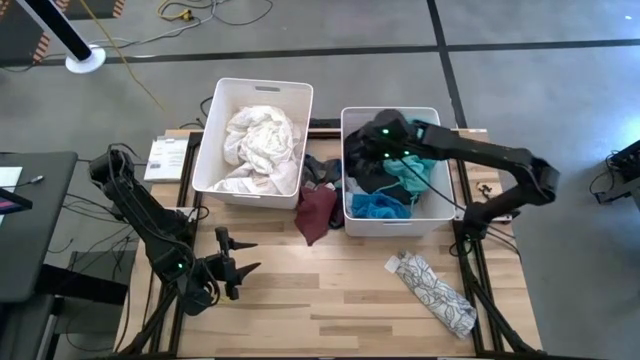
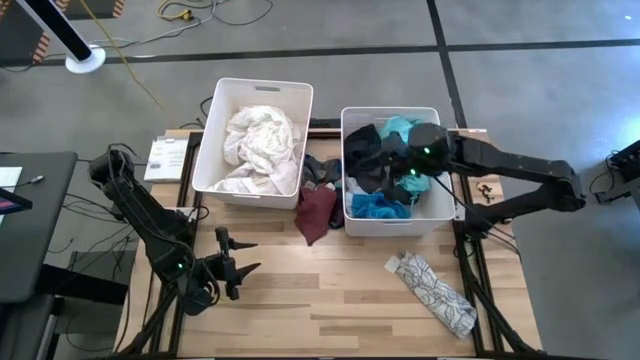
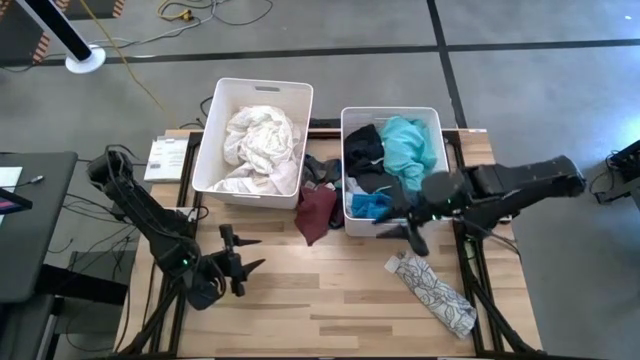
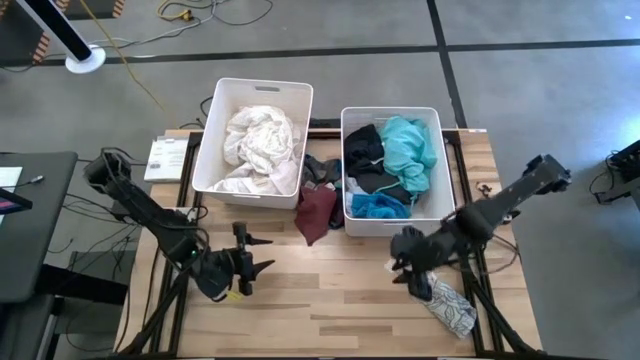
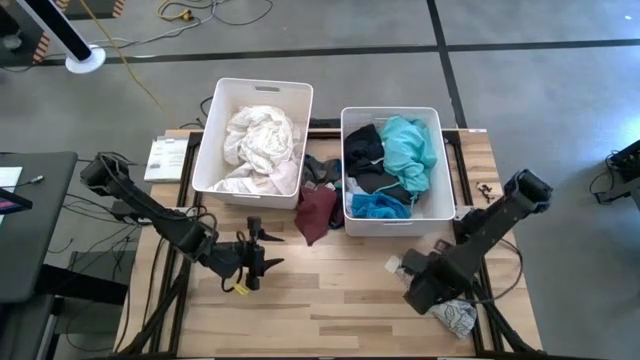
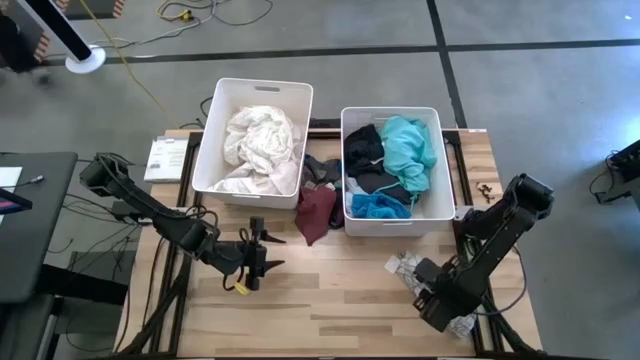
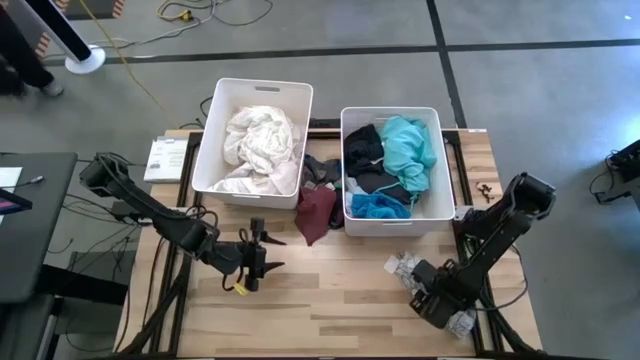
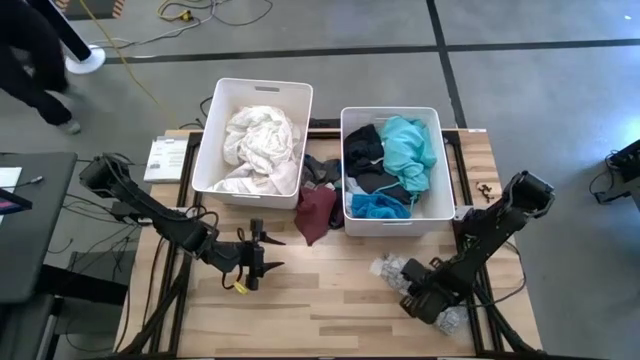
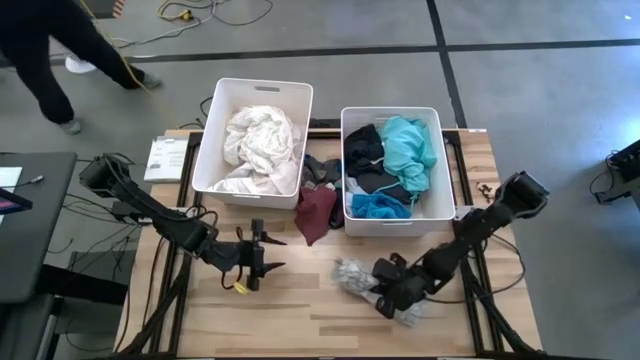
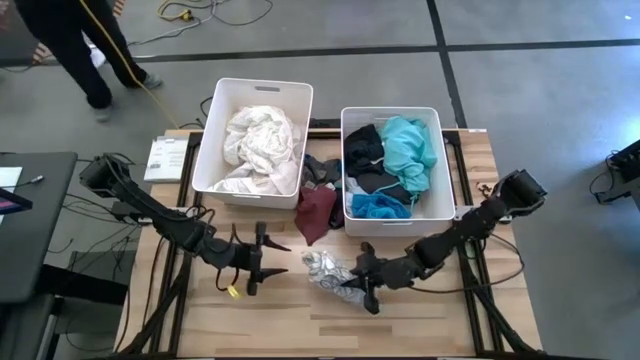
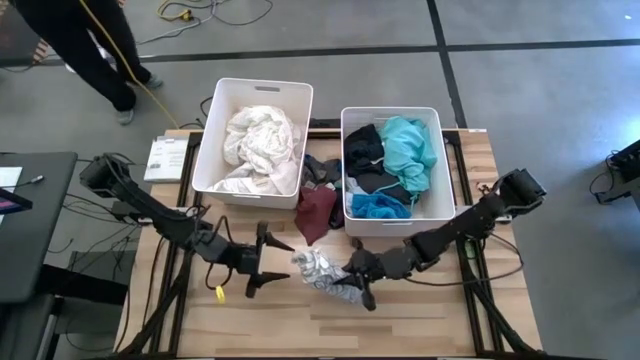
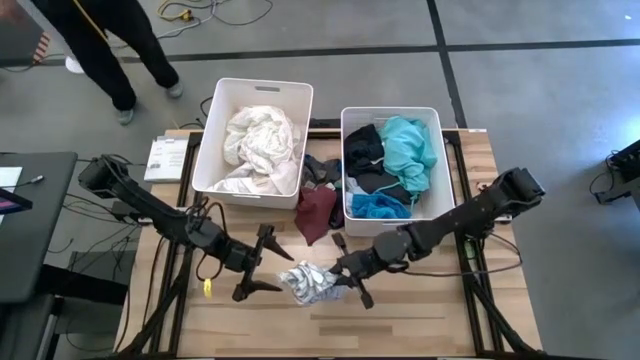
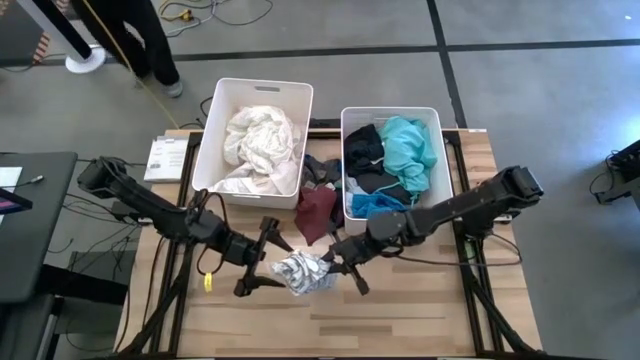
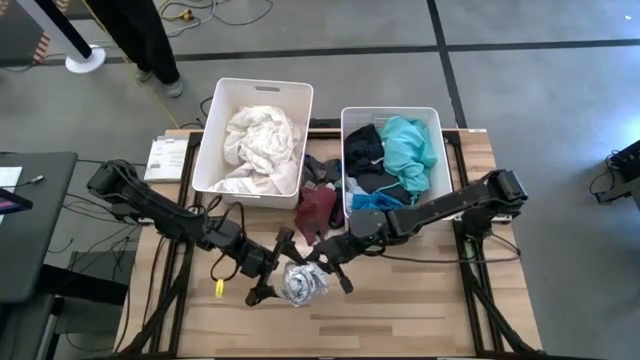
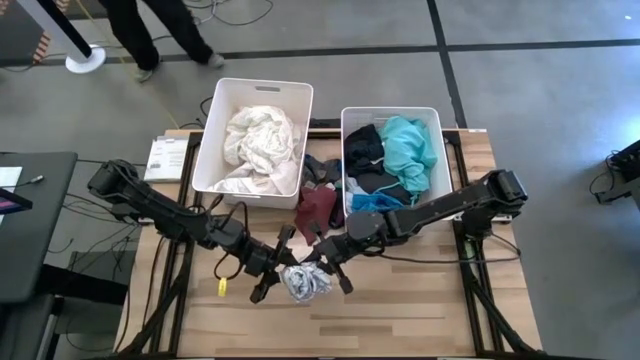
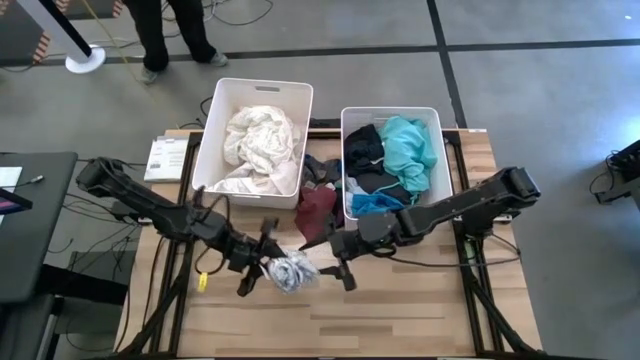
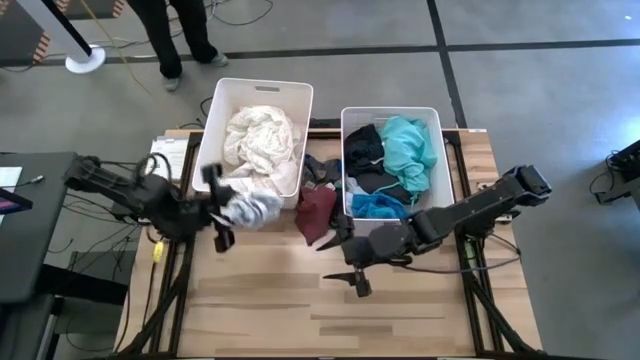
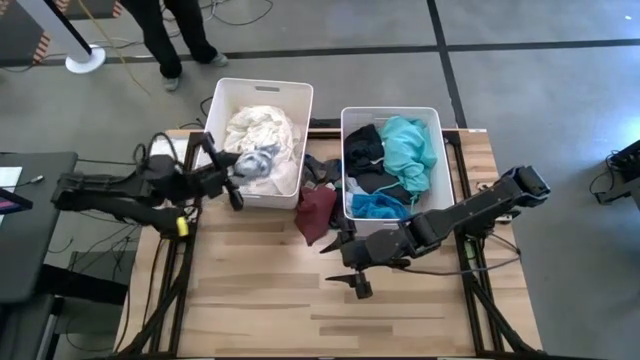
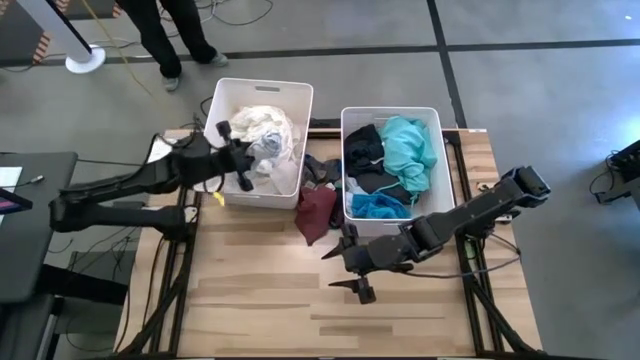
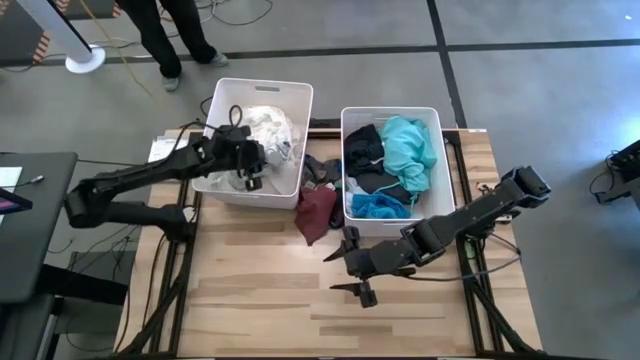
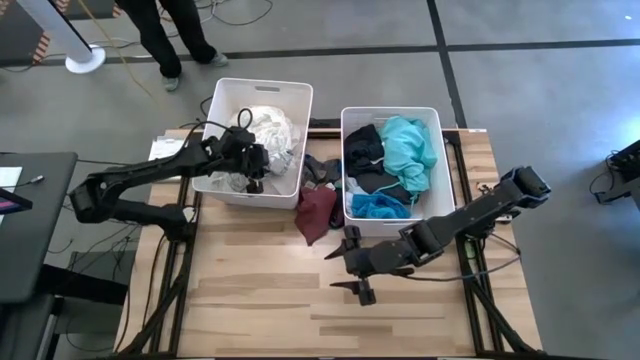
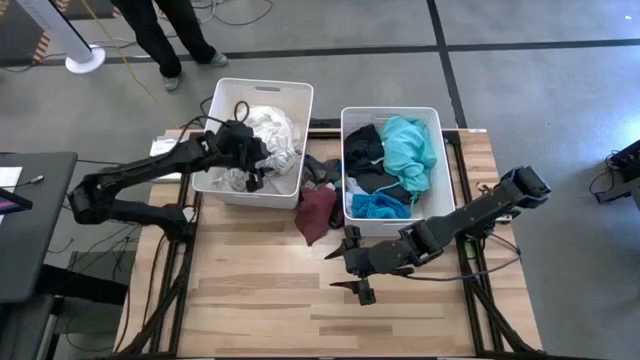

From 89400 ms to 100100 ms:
Task: Sort clothes
Put the white-black patterned shirt into the left white laundry bin

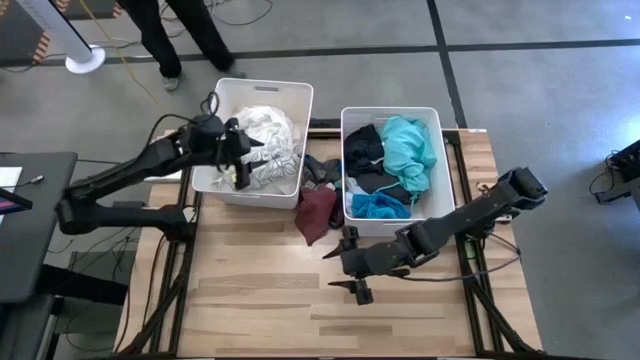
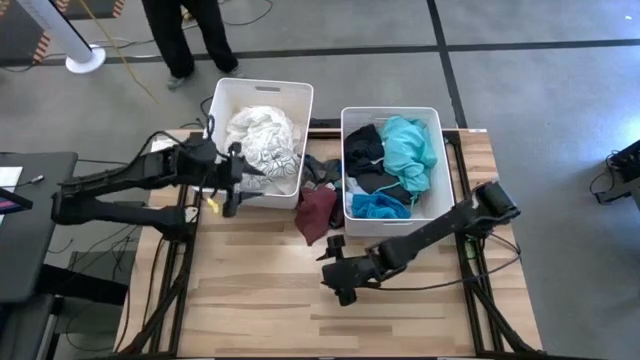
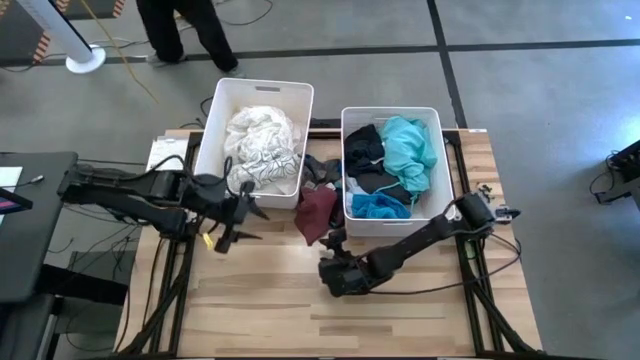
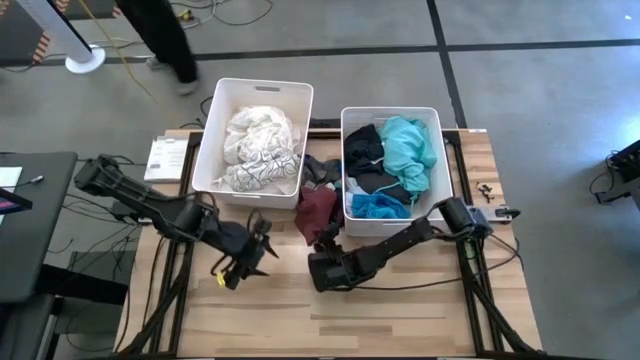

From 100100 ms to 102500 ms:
Put the red underwear into the right white laundry bin

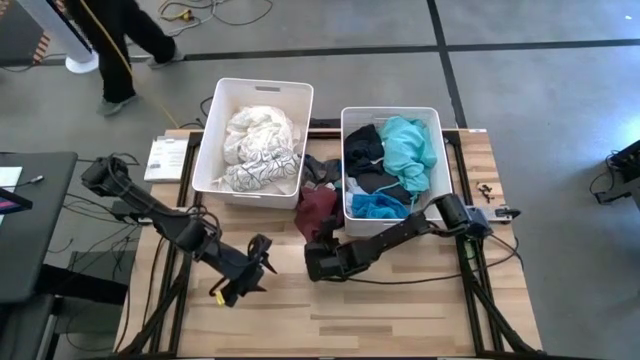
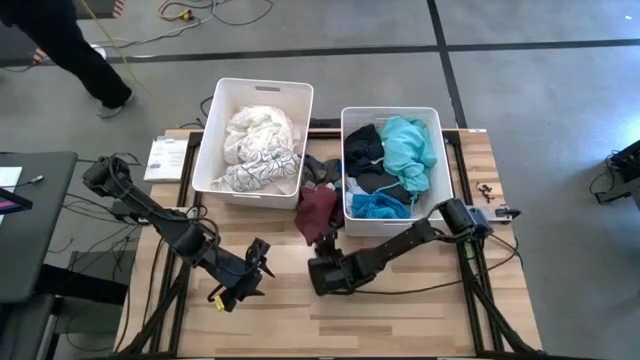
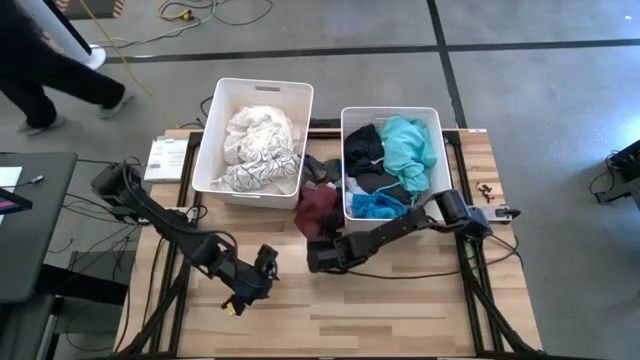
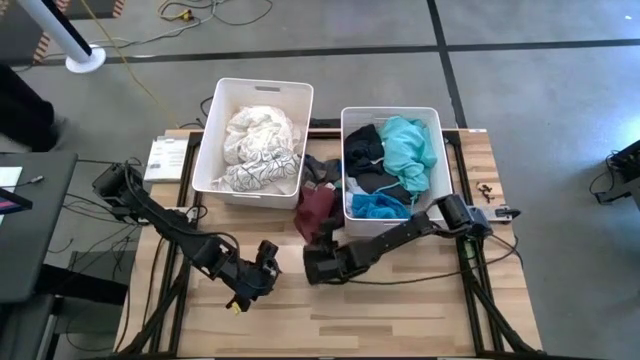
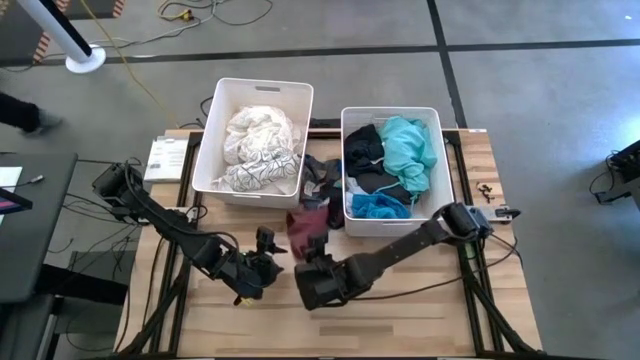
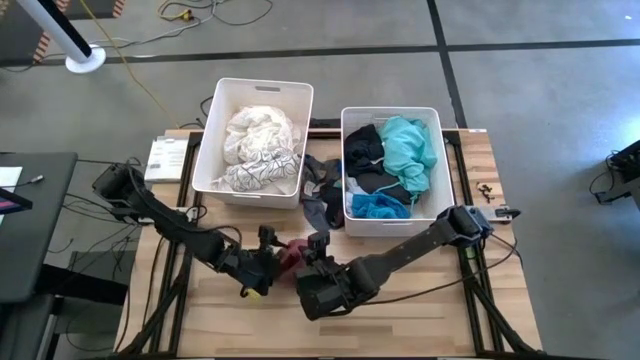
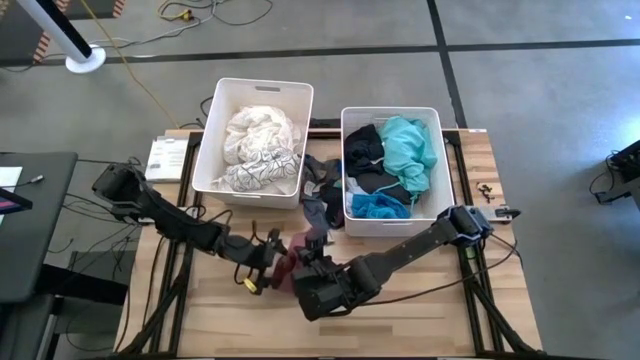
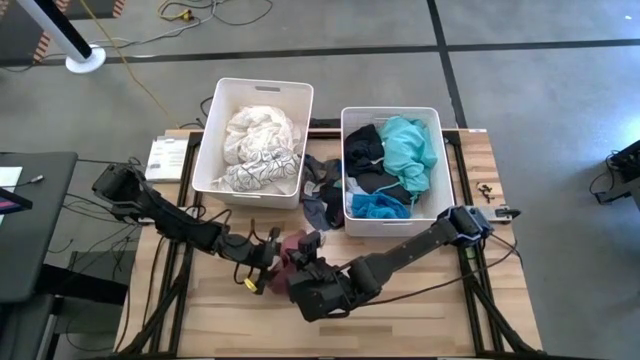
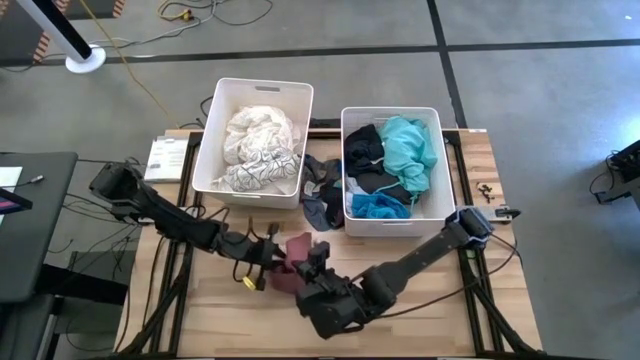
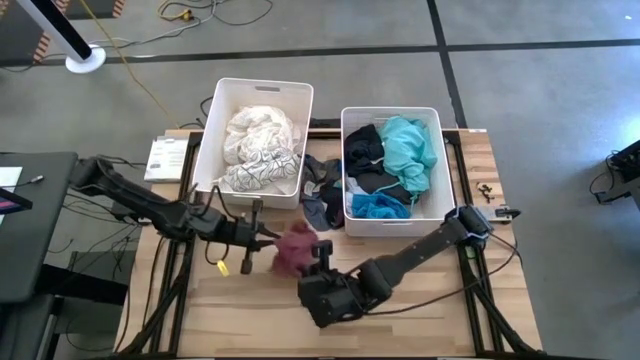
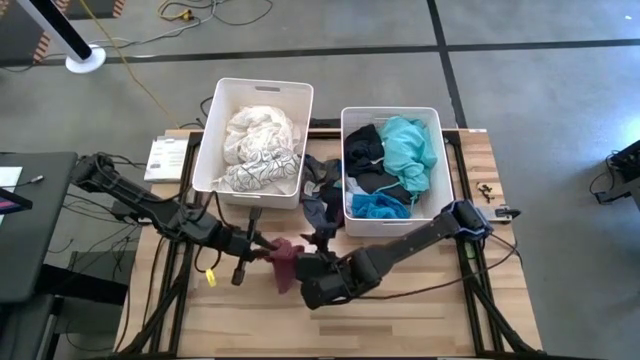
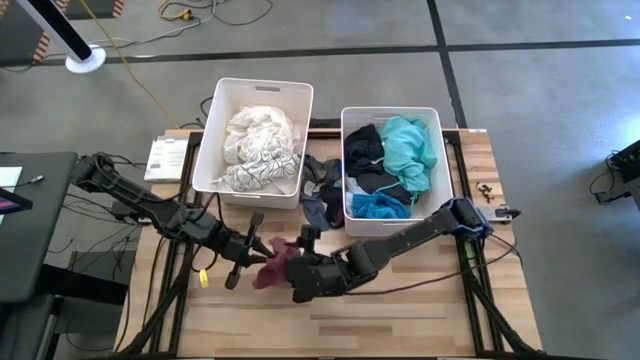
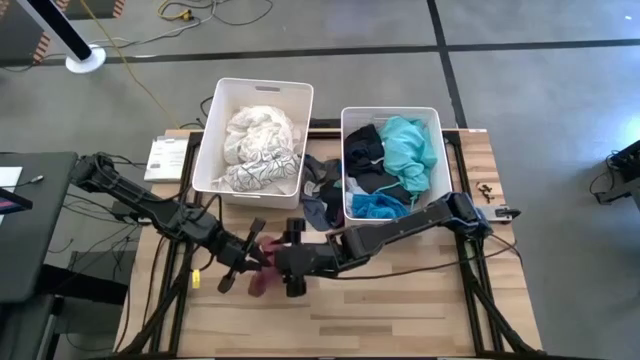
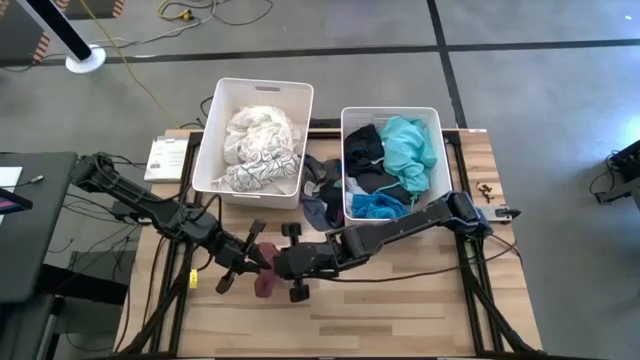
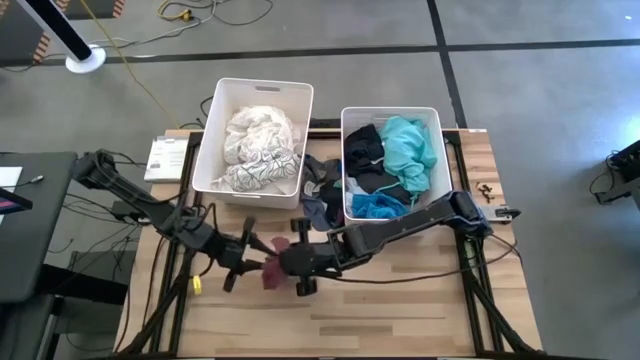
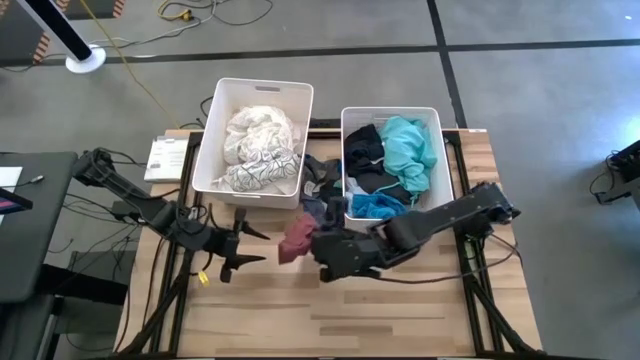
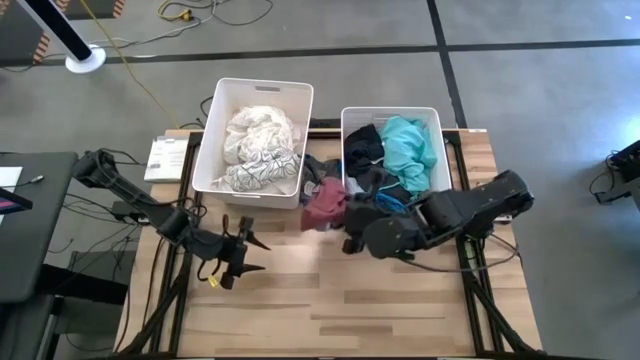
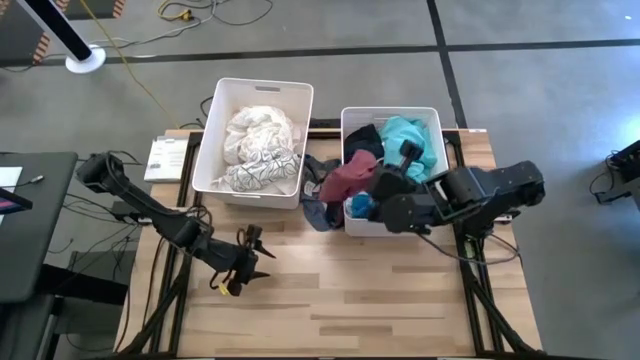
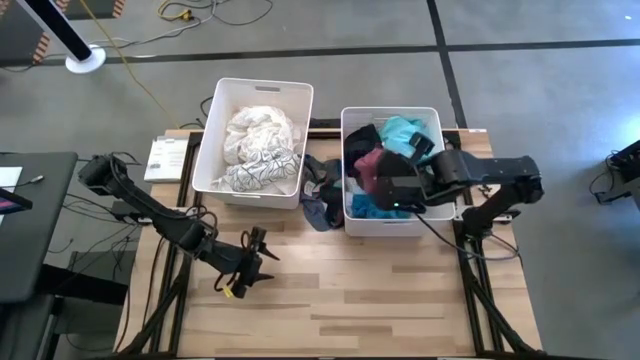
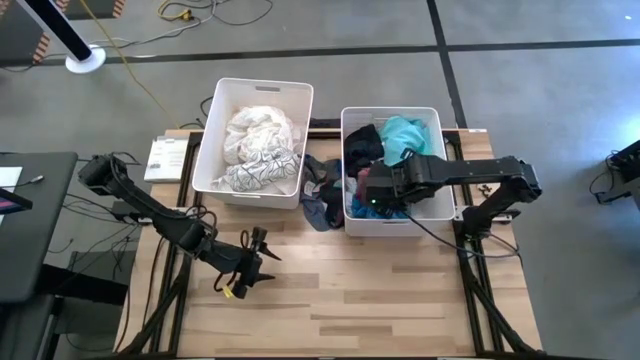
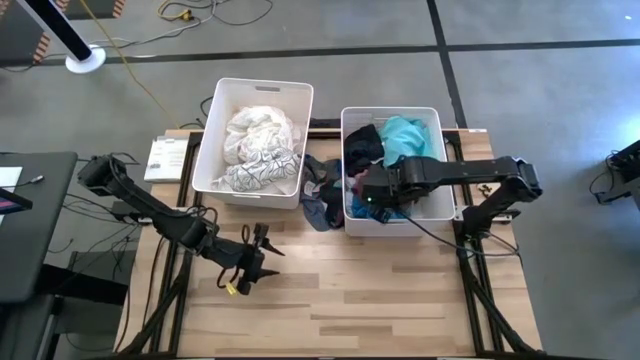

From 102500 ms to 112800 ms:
Put the red underwear into the right white laundry bin
